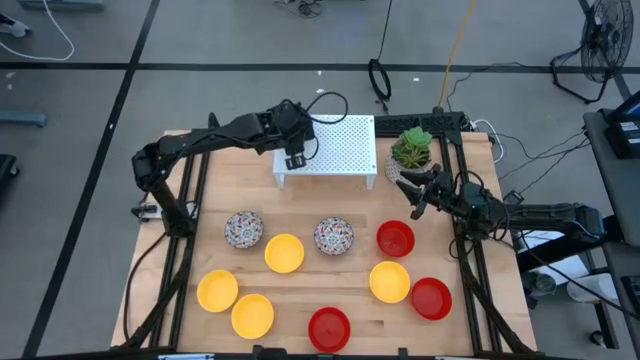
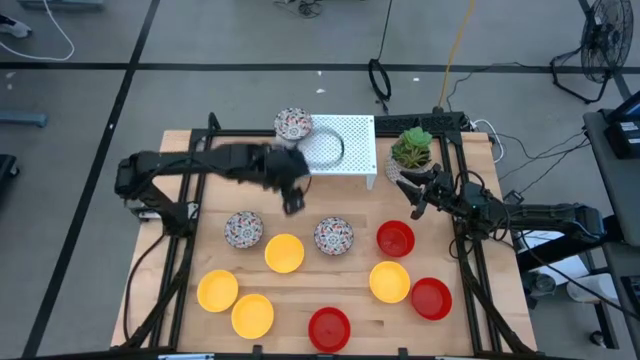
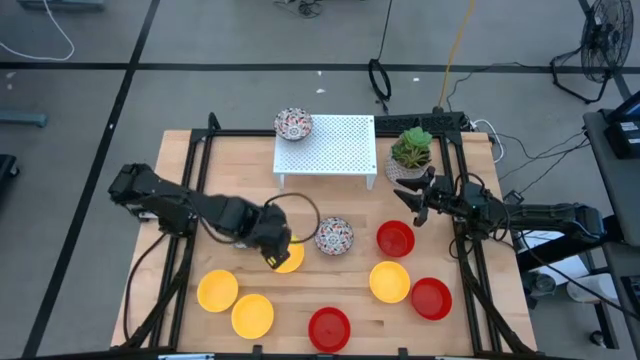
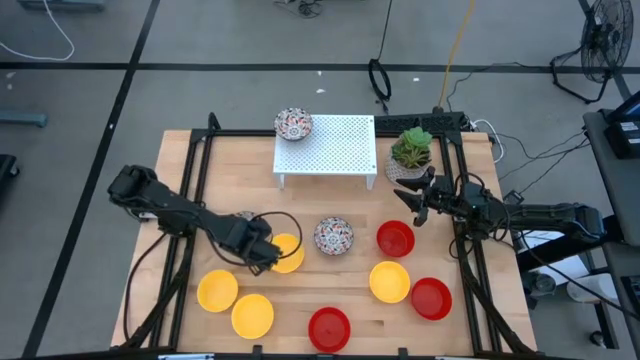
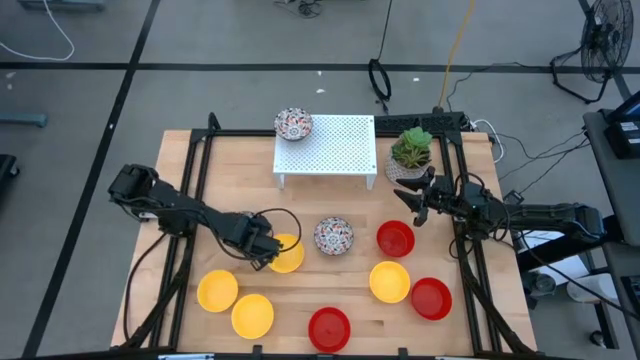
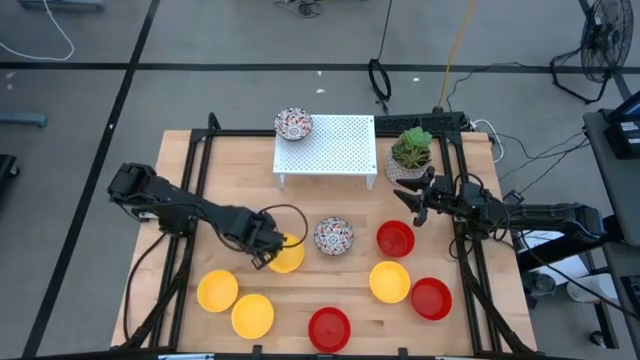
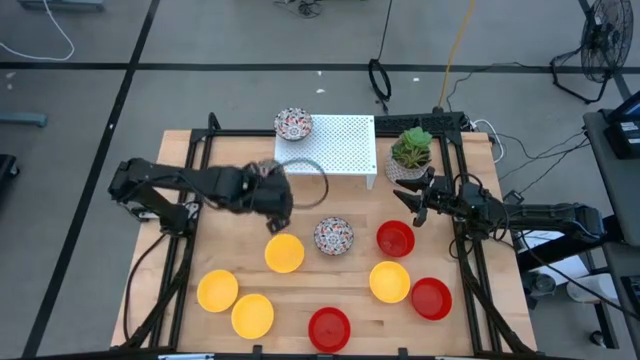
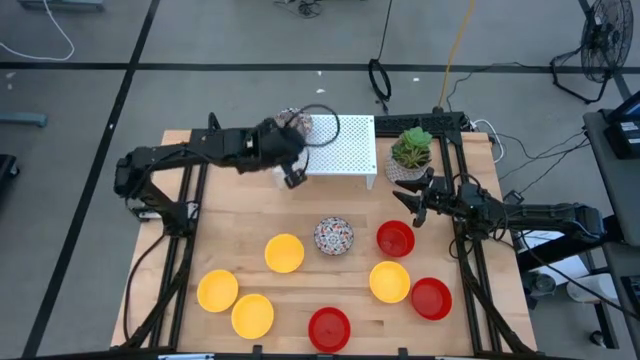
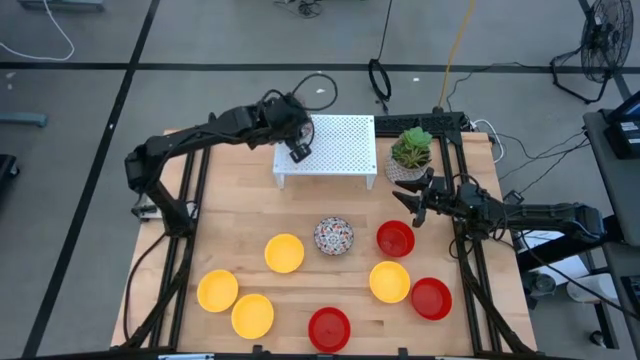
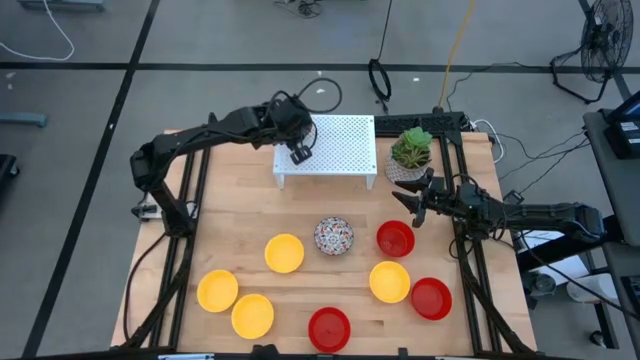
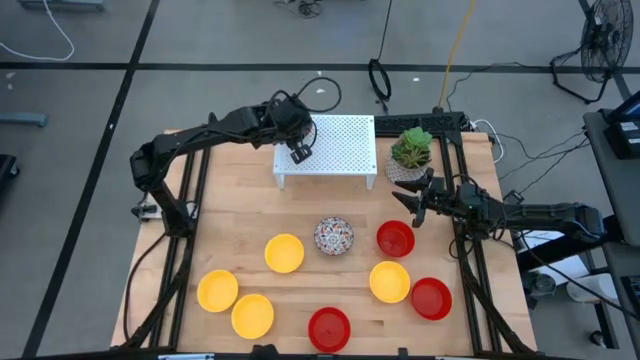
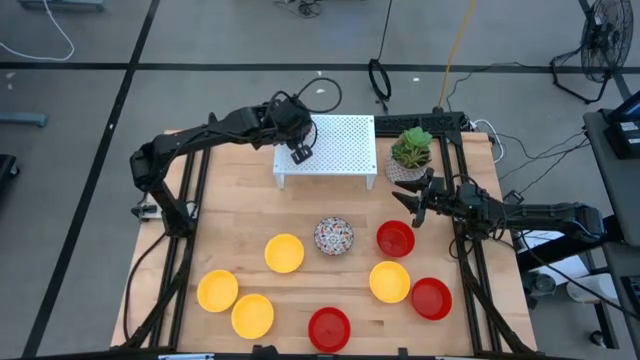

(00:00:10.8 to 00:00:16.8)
Task: Pick & Place Mini bowls
Stack the white patterned bowl on the white patterned bowl on the shelf

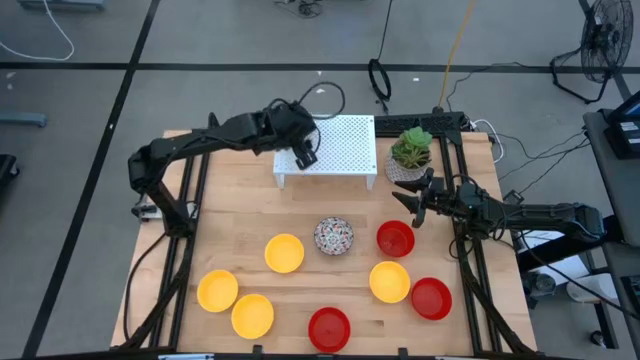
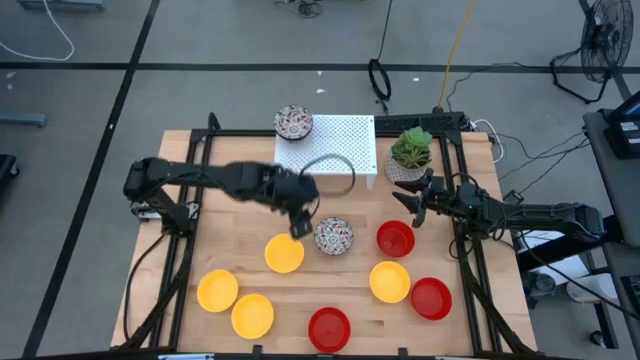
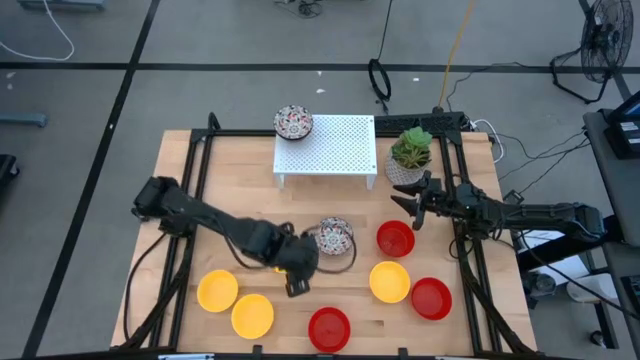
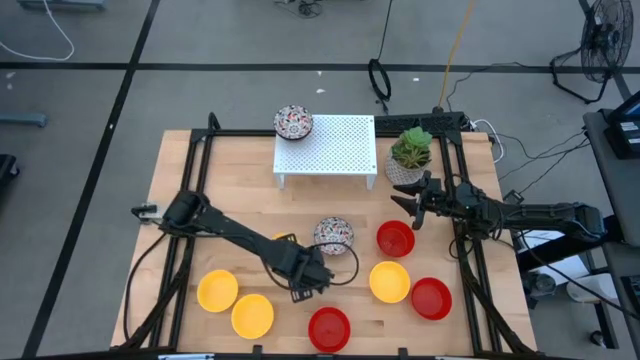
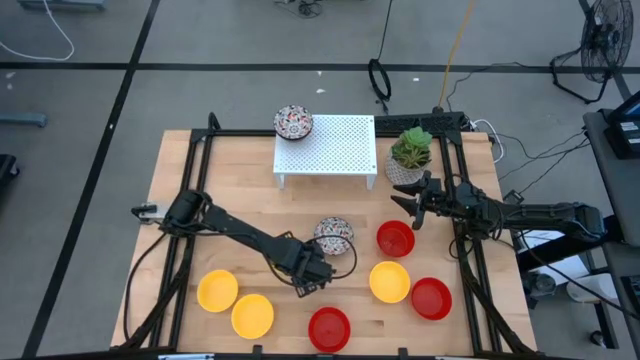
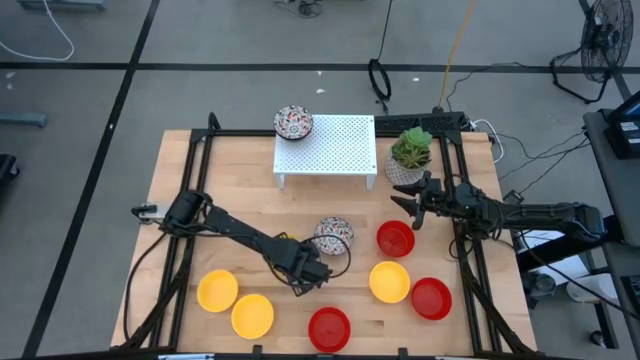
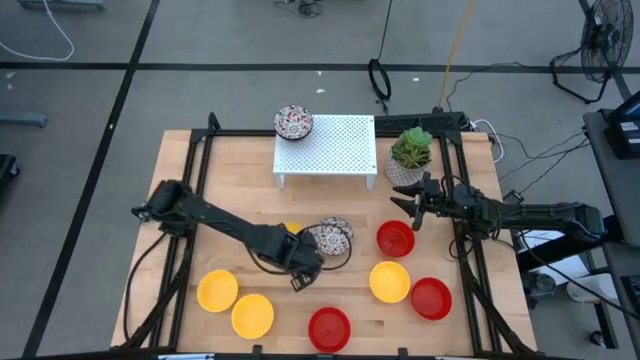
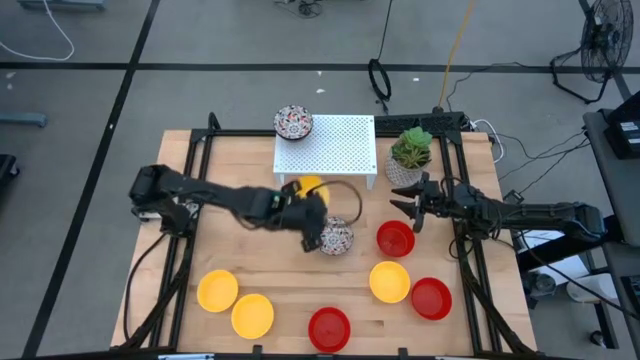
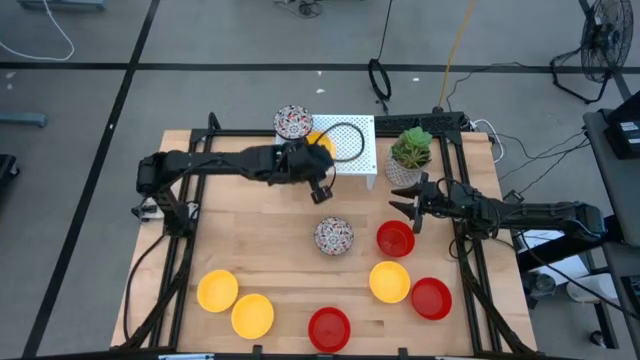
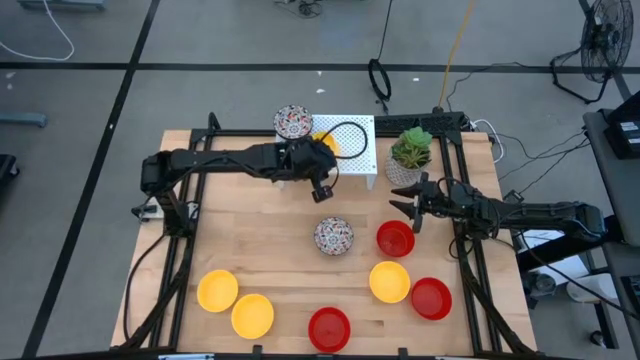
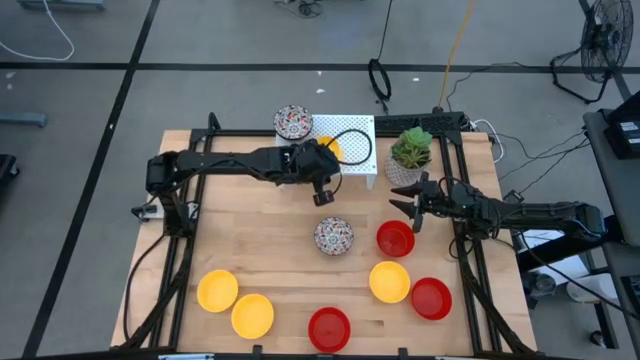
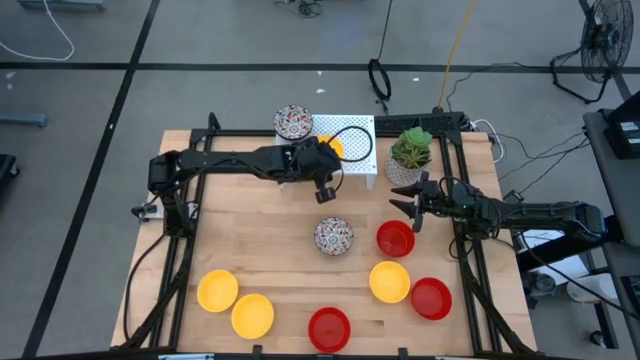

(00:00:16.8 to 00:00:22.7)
Put the yellow bowl on the shelf

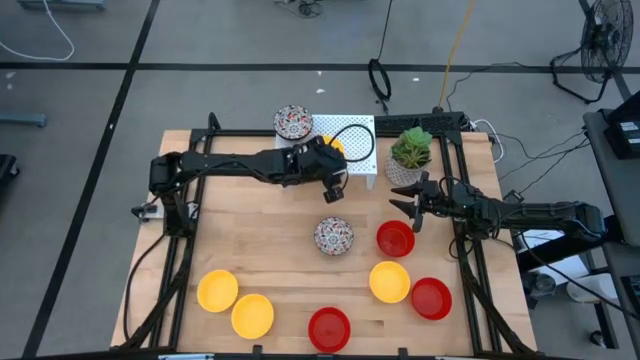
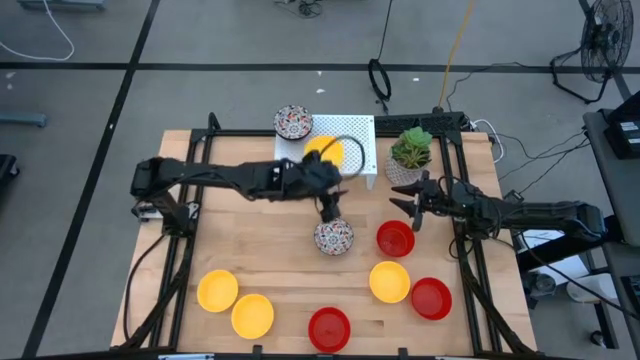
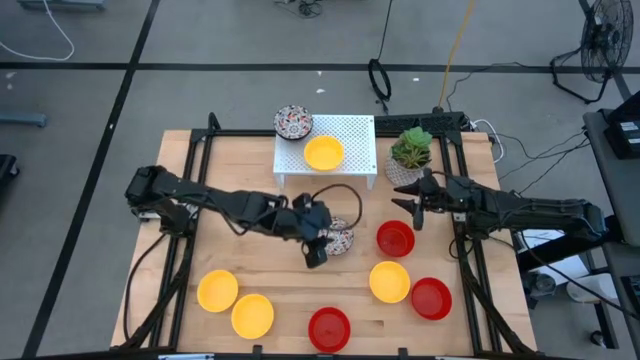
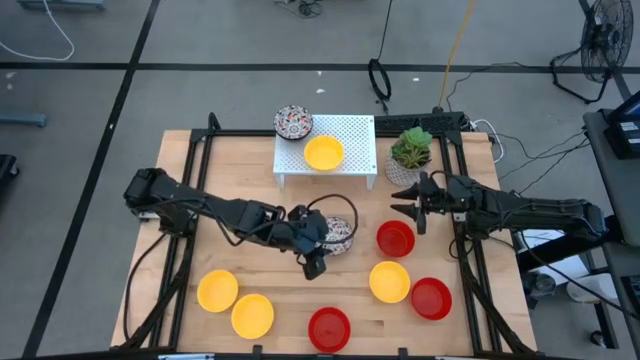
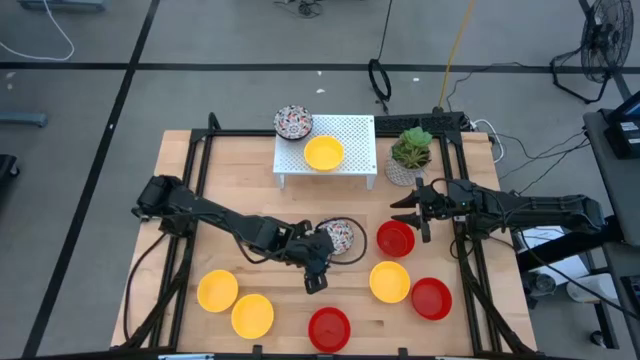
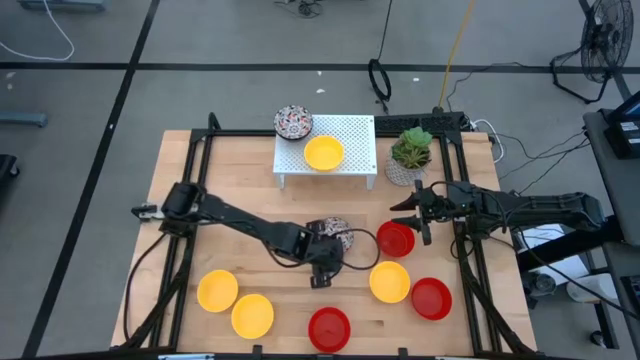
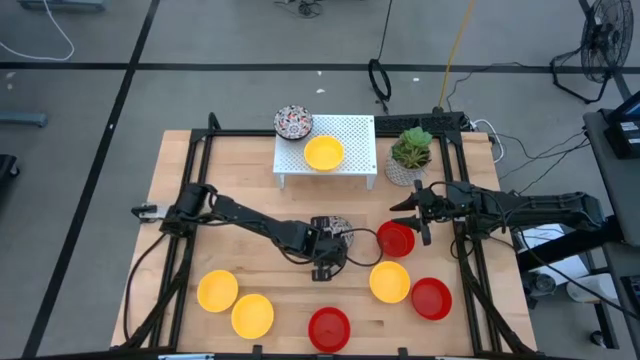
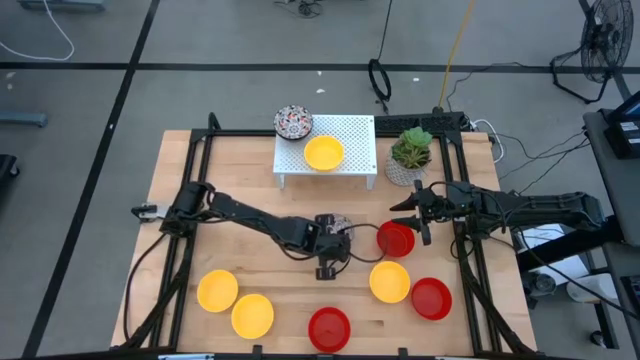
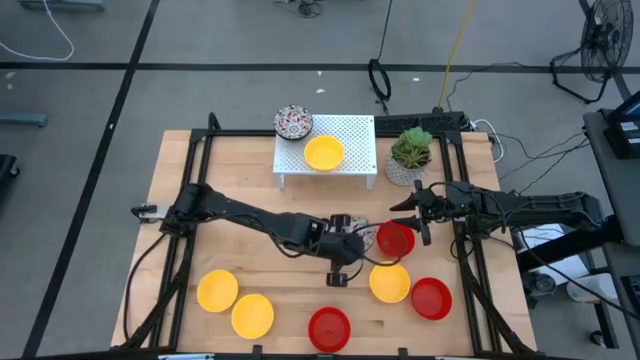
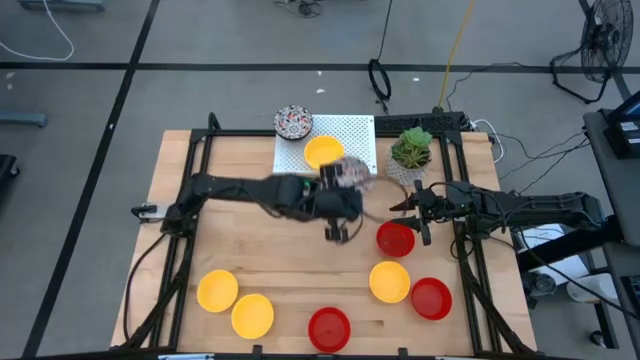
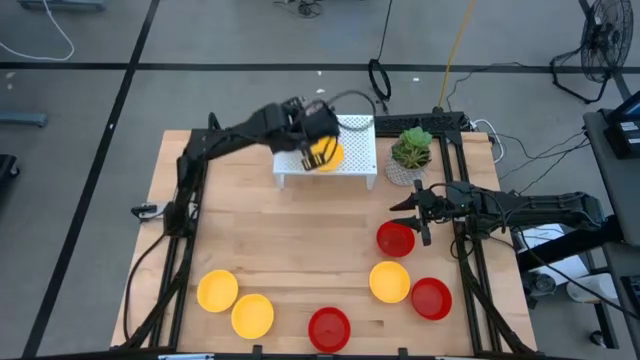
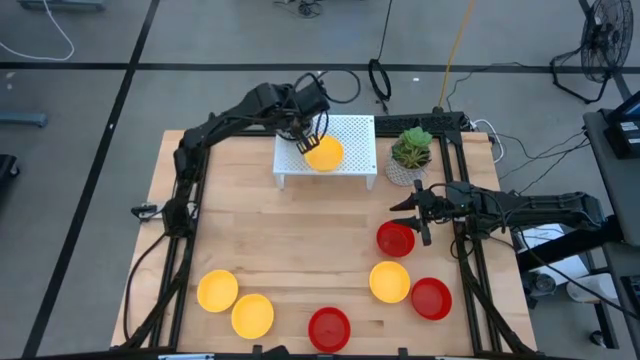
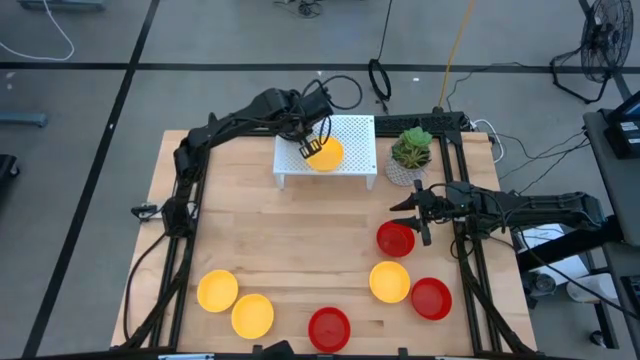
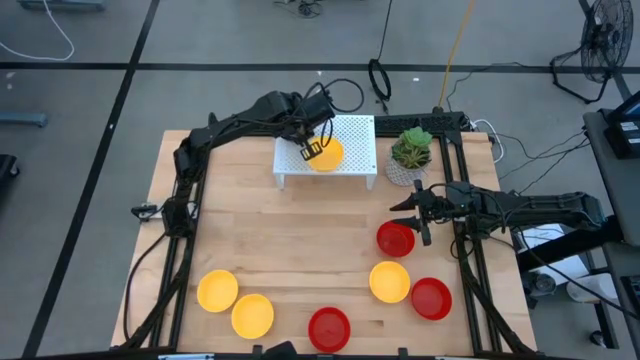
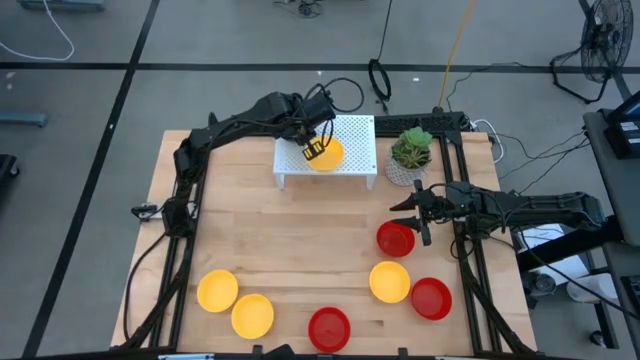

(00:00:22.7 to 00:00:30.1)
Stack the white patterned bowl on the white patterned bowl on the shelf

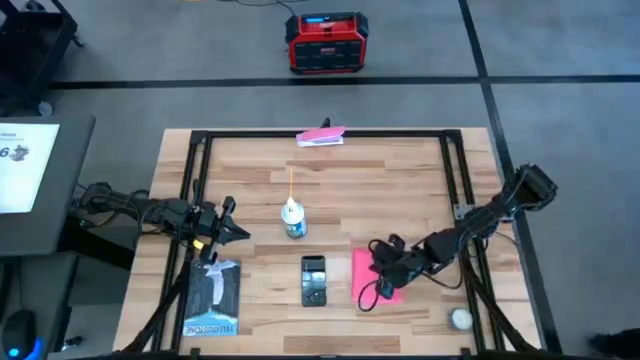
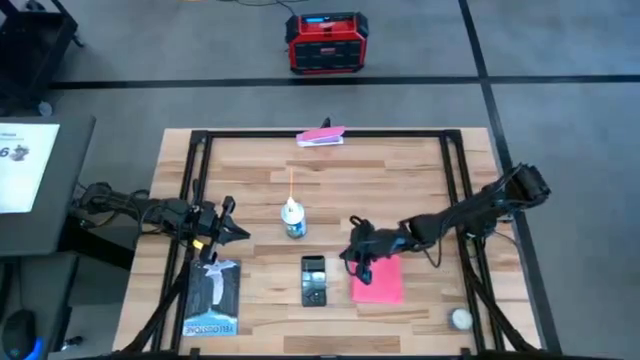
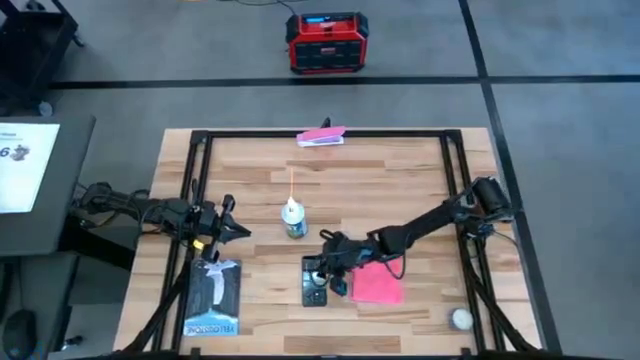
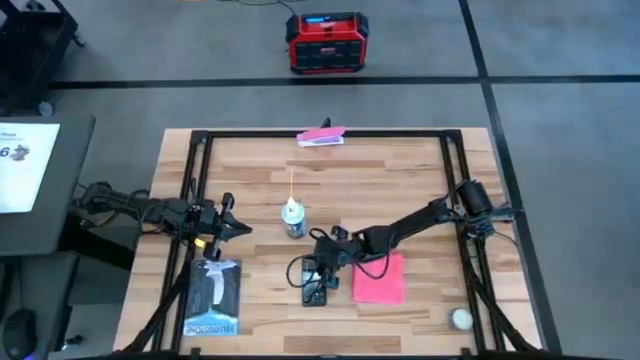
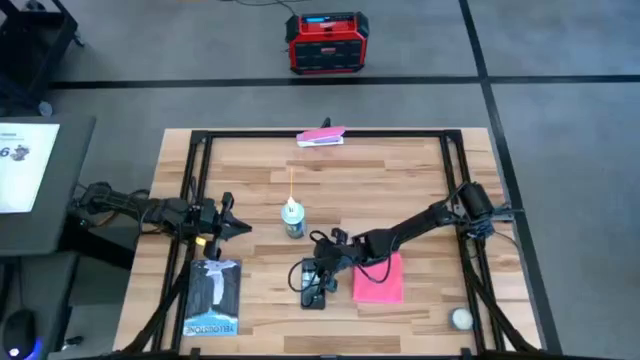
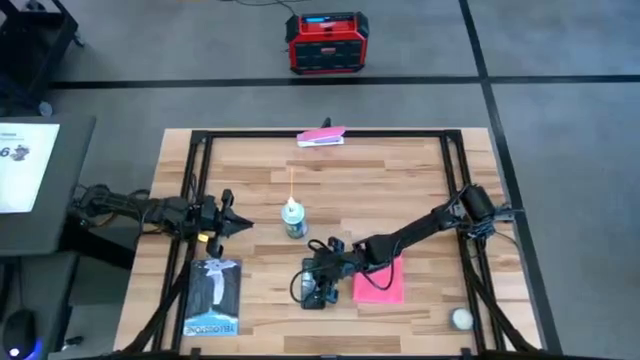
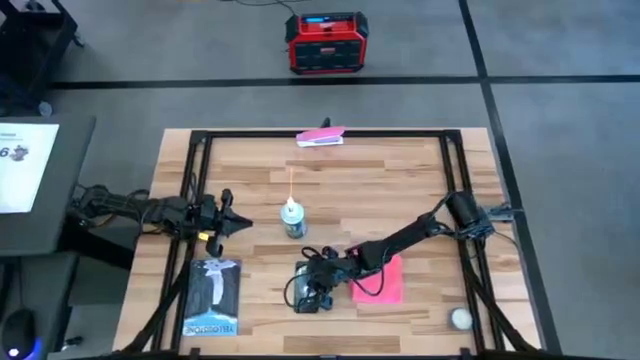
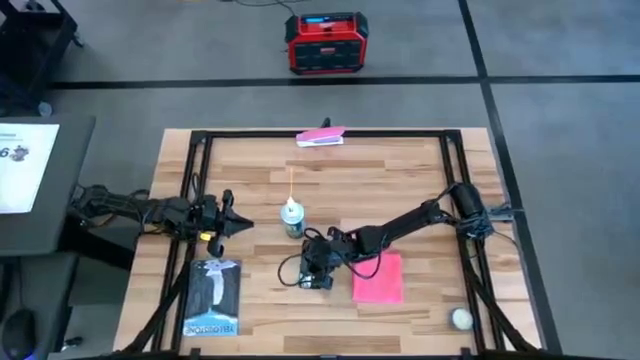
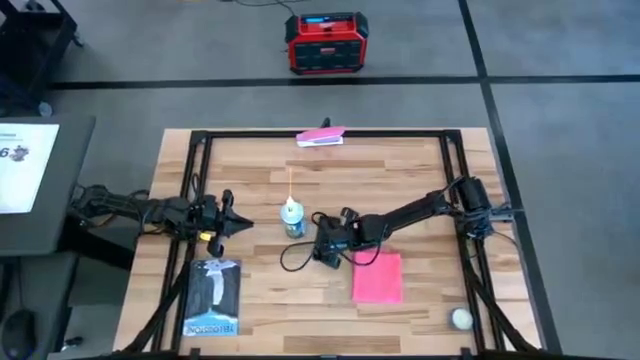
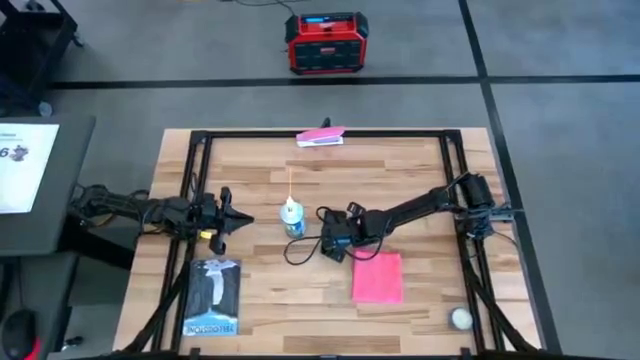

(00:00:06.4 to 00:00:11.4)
Task: Apply microfiber cloth
Adjust the black phone on the table
